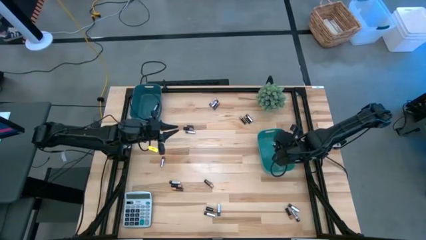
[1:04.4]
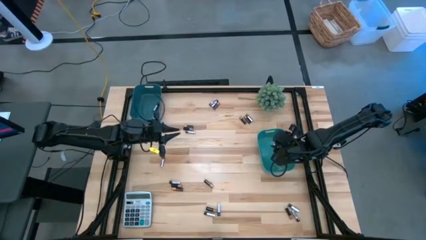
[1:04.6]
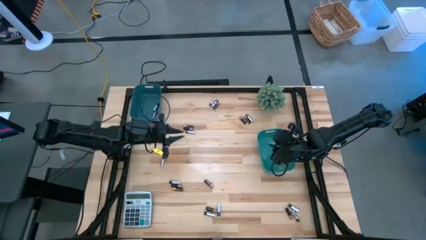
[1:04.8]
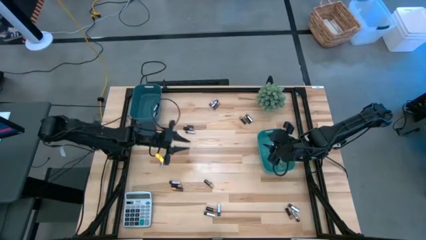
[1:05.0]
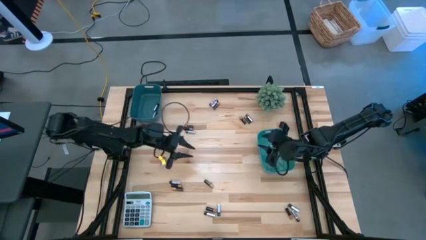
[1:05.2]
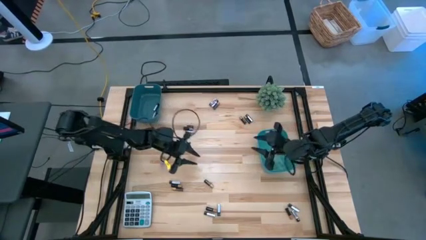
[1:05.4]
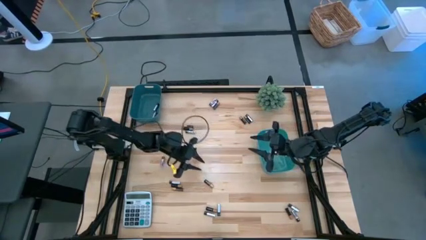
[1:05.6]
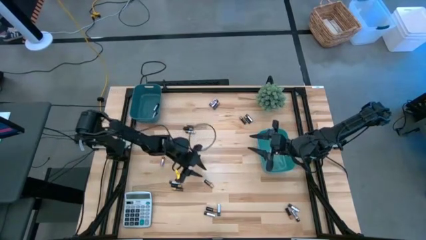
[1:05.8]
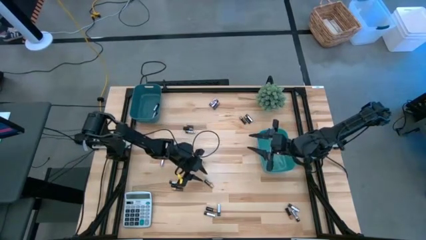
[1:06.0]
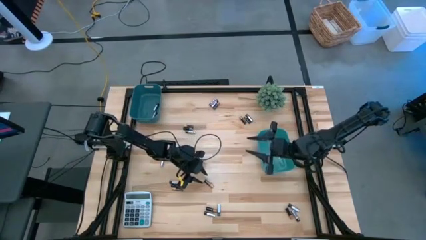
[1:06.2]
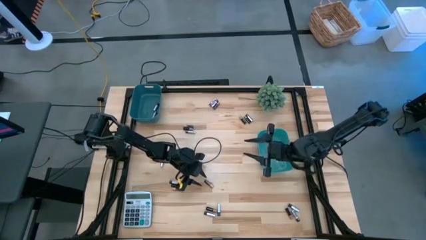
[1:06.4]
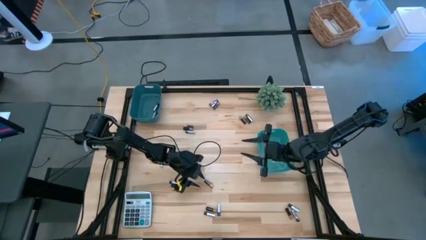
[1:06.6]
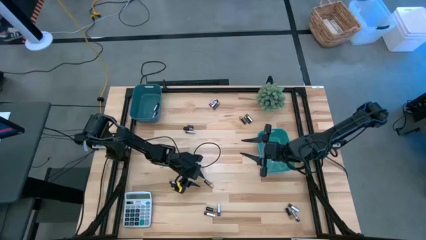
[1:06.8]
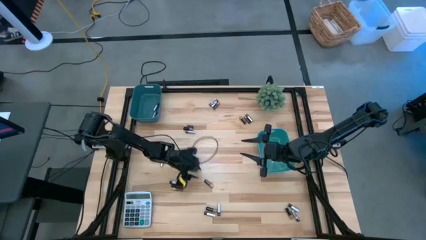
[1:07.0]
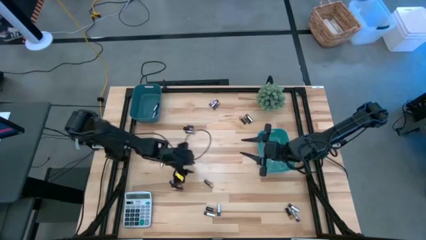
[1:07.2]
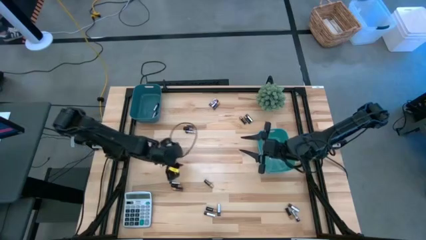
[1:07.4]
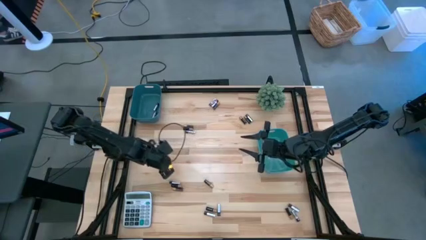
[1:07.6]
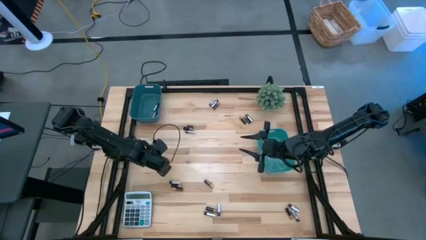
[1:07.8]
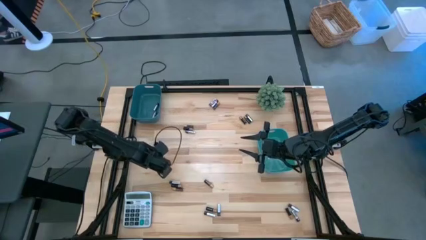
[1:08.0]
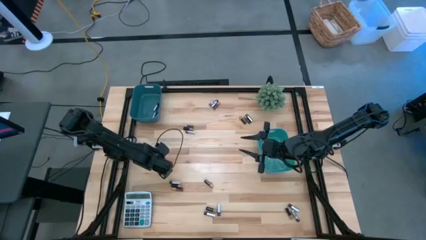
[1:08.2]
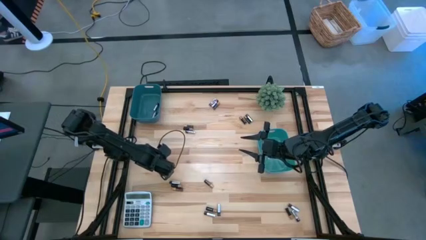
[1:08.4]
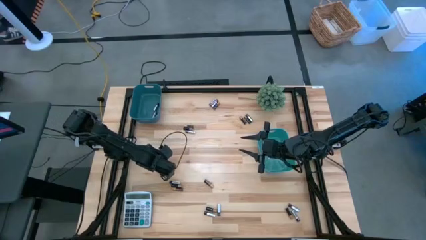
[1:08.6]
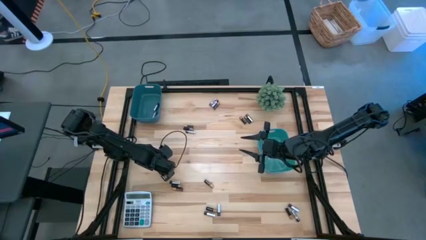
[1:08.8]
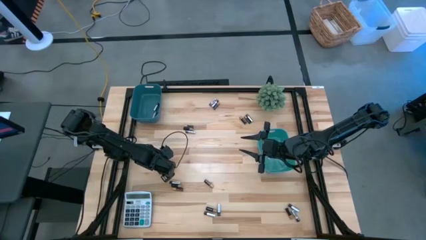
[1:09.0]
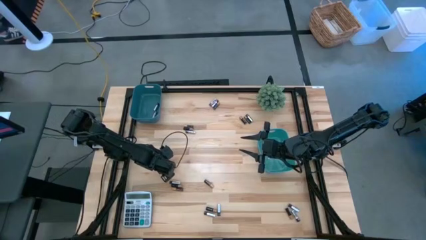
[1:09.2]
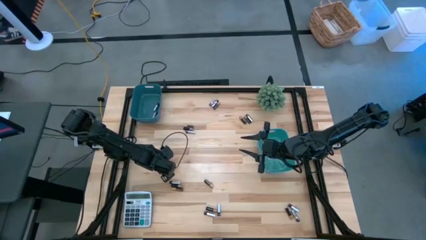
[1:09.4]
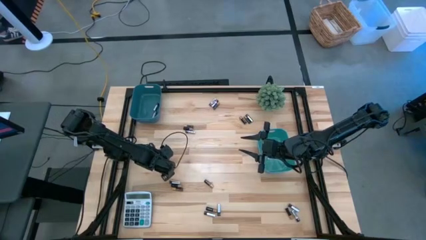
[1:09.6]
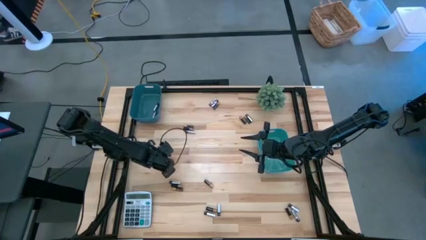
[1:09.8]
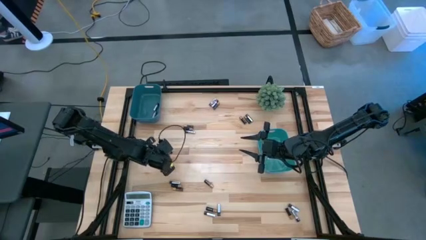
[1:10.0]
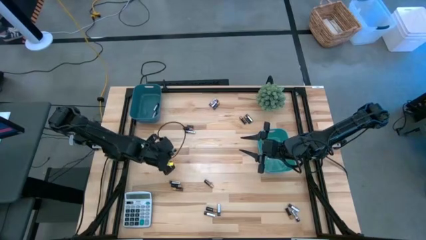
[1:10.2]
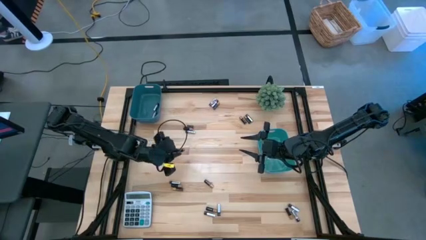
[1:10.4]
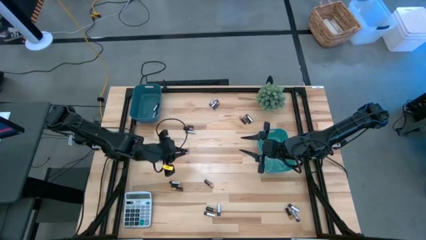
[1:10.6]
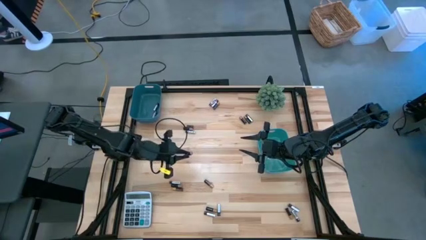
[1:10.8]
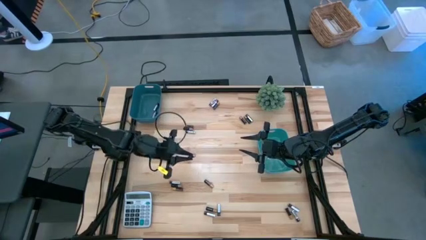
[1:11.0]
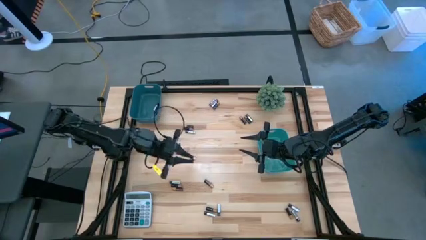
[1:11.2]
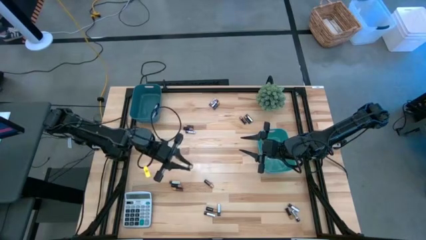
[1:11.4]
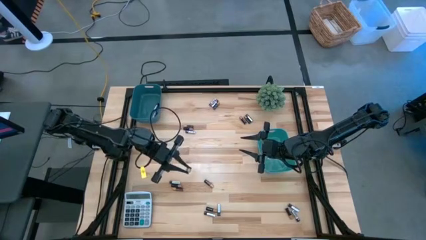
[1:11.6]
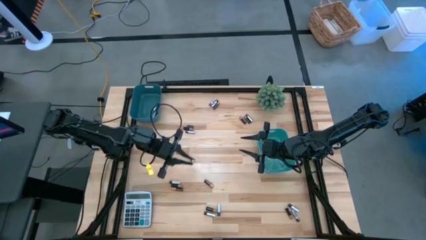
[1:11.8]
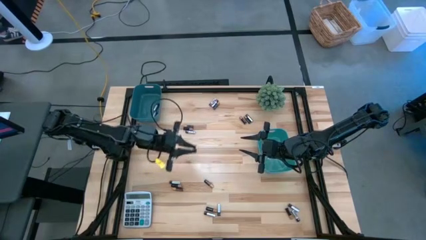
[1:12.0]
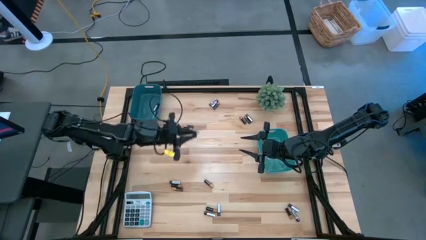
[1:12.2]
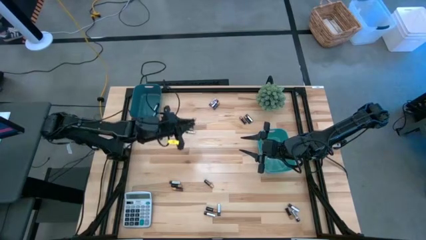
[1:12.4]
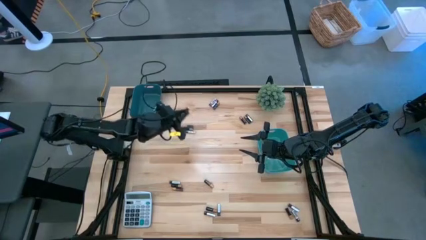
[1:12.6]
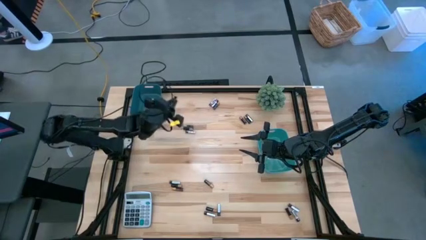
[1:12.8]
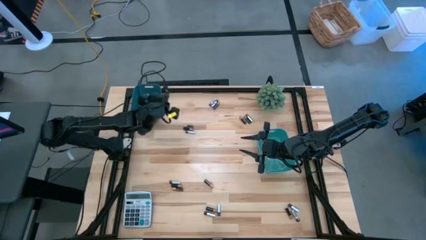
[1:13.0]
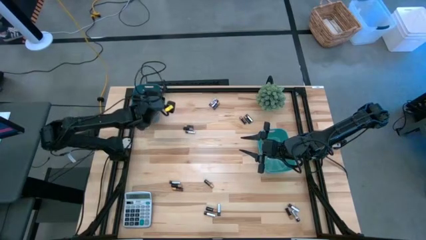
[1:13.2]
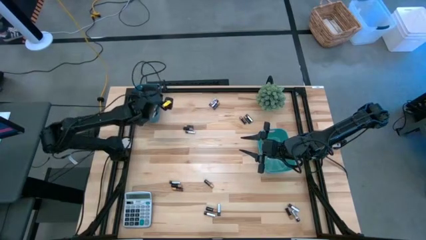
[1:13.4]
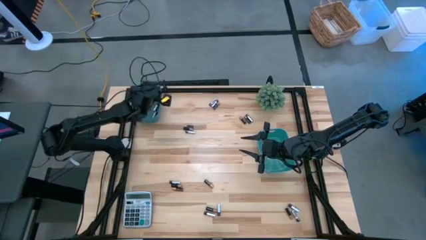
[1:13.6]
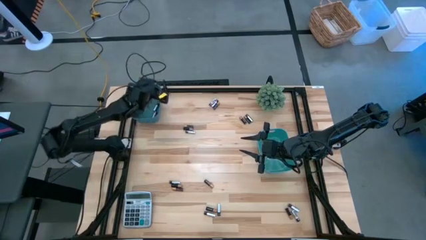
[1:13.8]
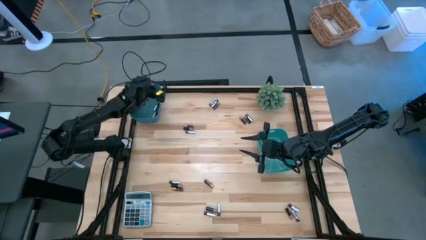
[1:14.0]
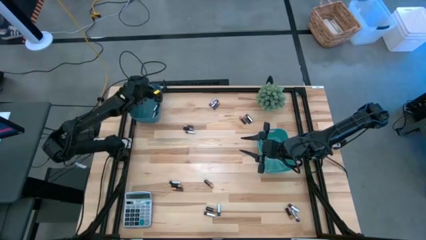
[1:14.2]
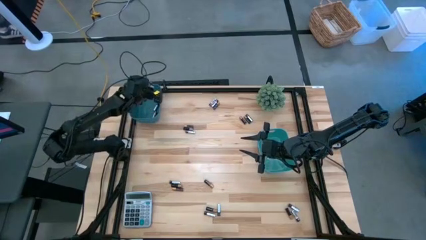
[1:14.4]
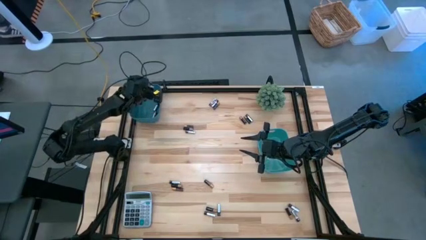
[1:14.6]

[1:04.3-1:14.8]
Task: Sort batteries
Put the black-silver battery into the blue bin

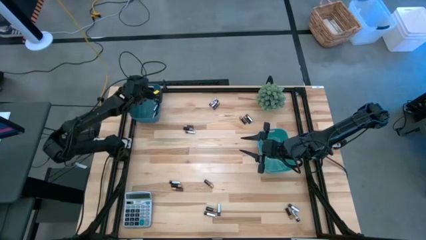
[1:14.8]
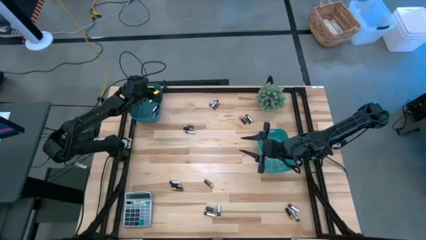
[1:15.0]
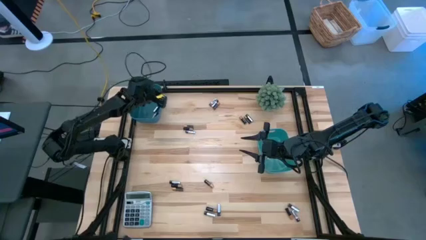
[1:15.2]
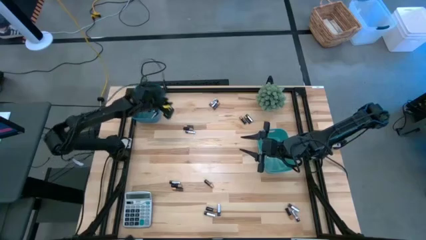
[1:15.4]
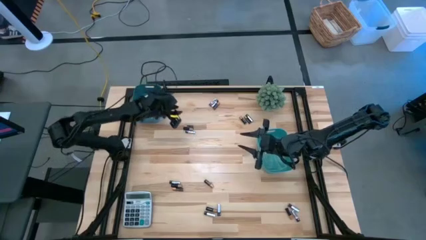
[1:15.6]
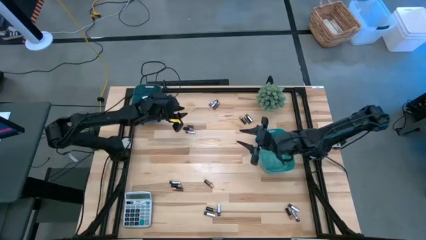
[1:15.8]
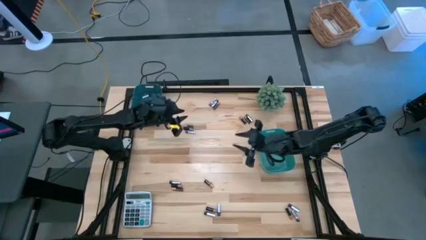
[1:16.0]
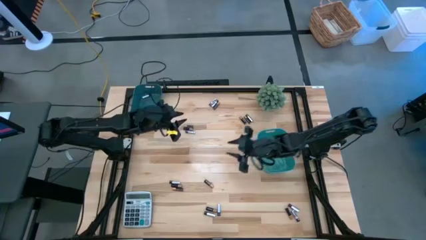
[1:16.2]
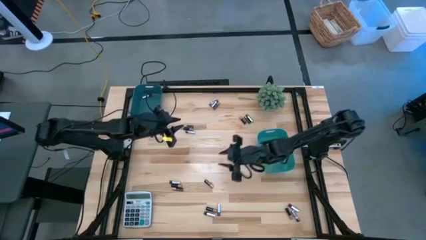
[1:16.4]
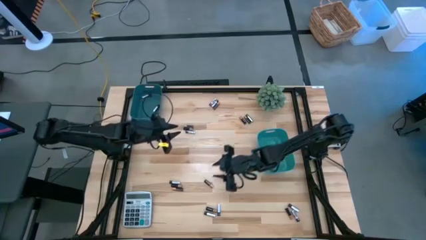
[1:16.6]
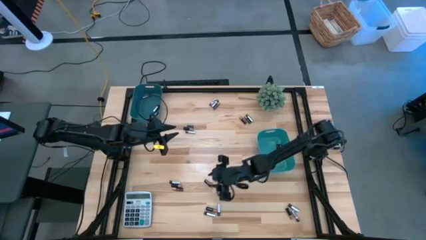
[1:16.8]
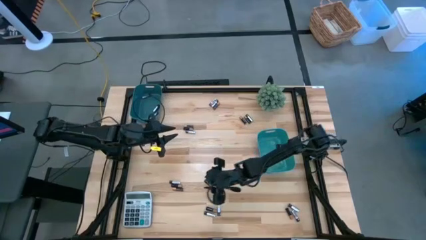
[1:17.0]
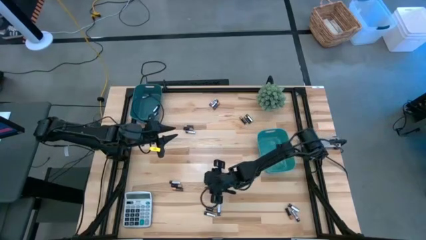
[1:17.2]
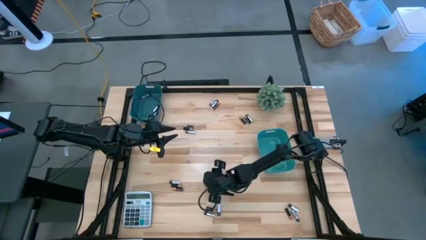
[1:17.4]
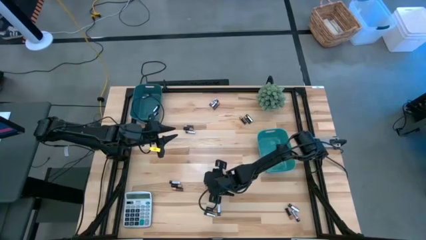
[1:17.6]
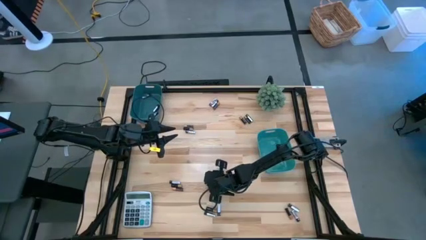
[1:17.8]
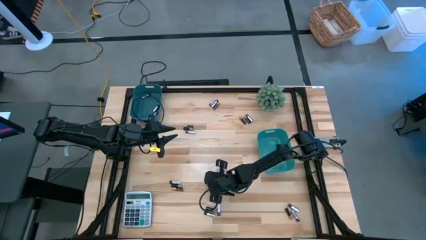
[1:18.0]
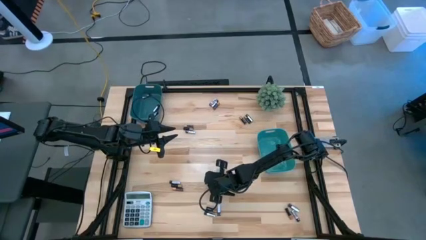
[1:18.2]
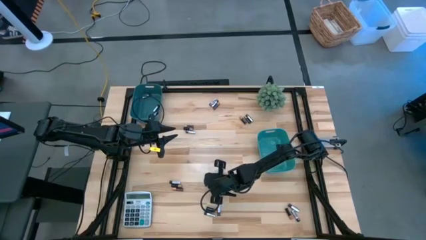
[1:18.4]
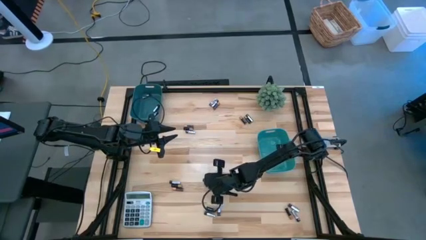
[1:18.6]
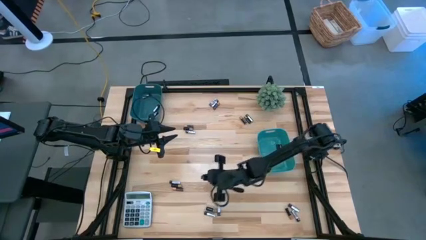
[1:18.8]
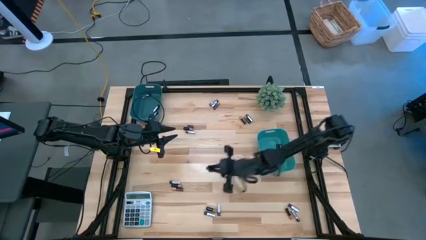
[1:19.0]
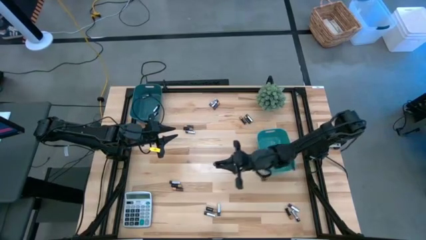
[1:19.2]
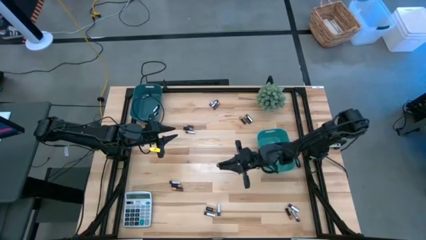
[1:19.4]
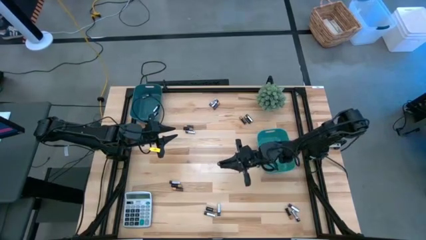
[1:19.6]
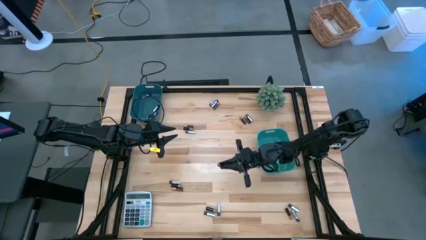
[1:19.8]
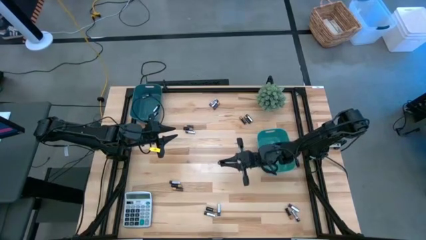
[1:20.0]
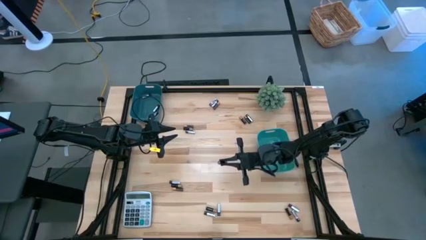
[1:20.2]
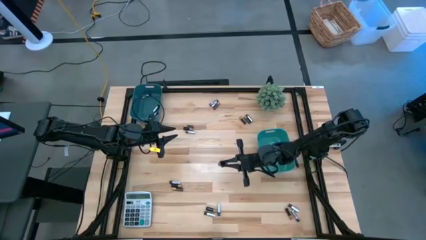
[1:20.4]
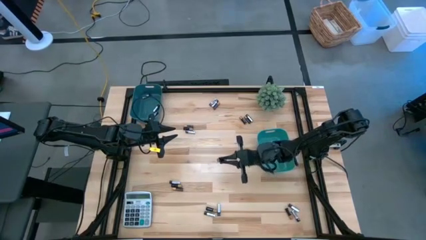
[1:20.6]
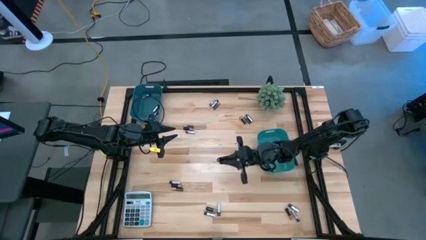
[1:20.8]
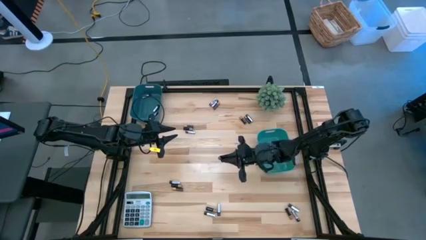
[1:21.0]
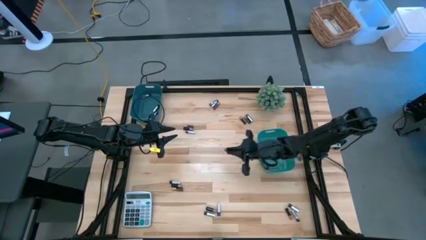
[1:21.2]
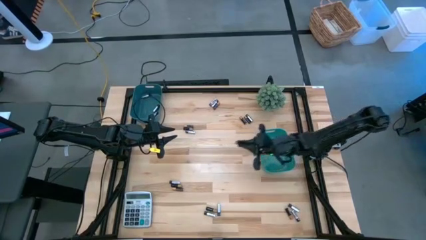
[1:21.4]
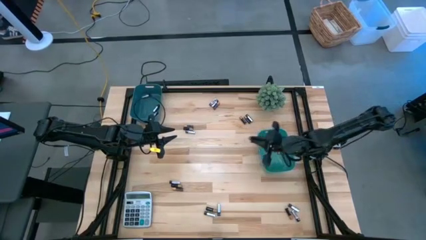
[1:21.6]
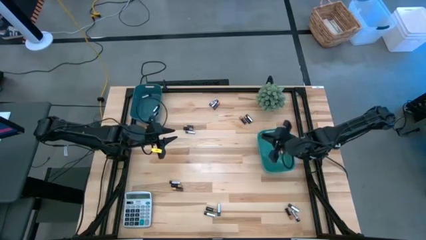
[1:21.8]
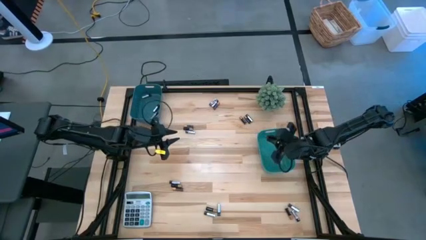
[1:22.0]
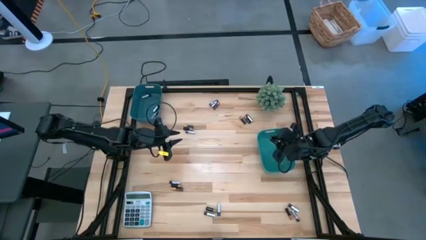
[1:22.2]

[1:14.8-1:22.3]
Put the brown-block battery into the green bin
